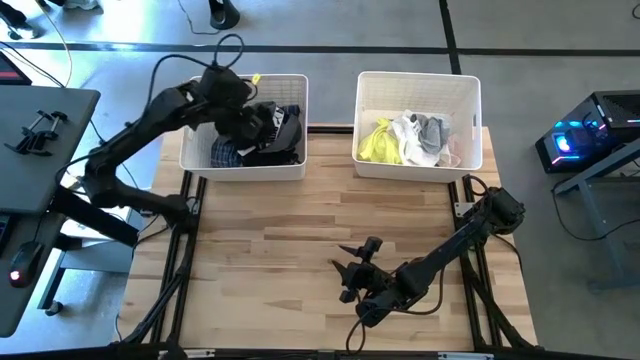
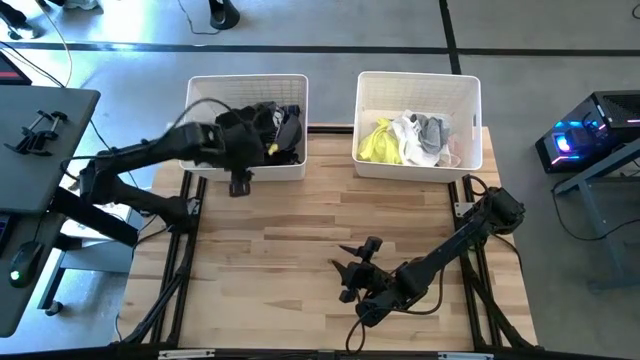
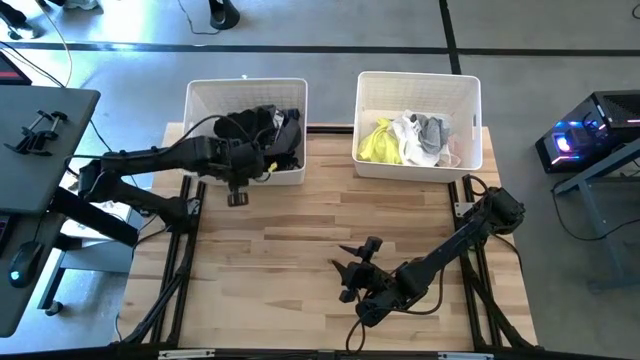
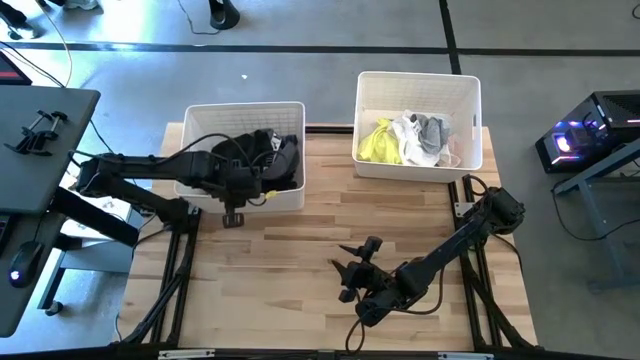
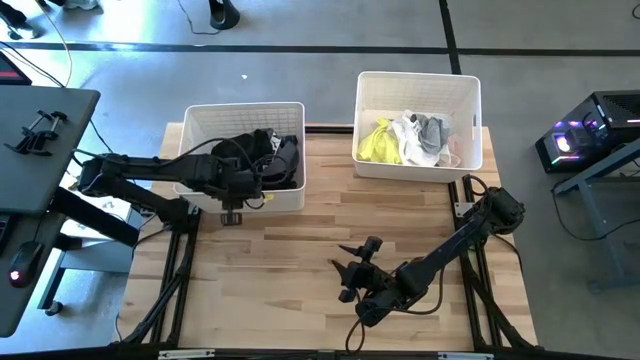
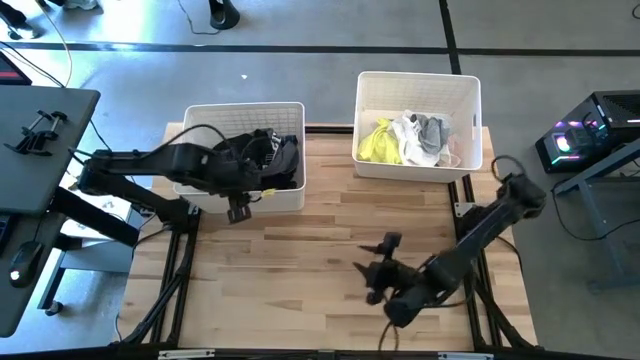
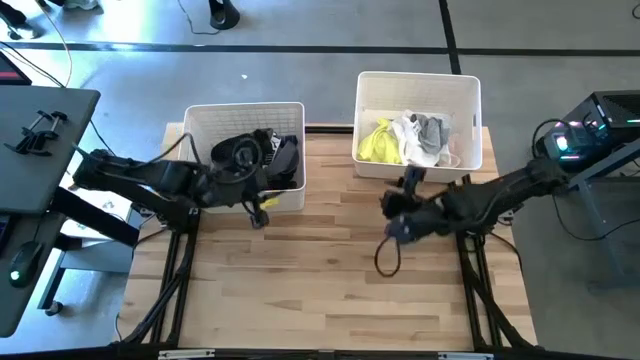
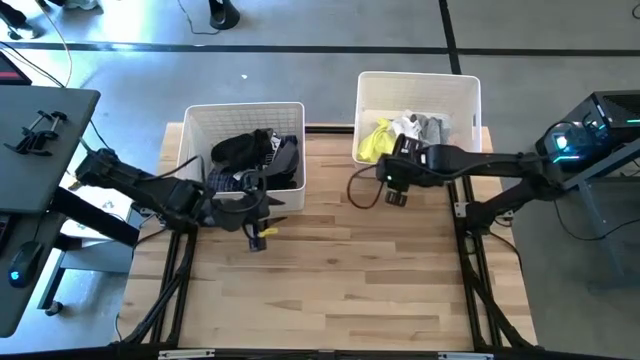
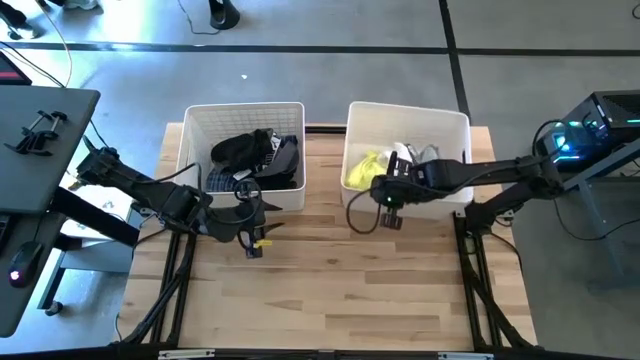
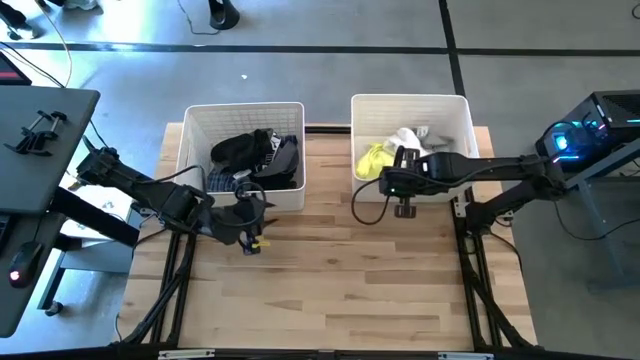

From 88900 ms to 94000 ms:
Task: Sort clothes
Adjust the white bins on the table

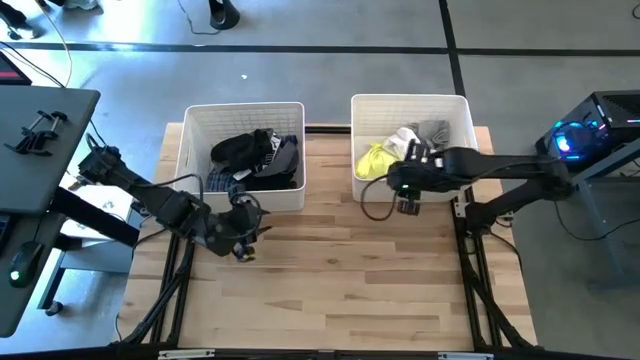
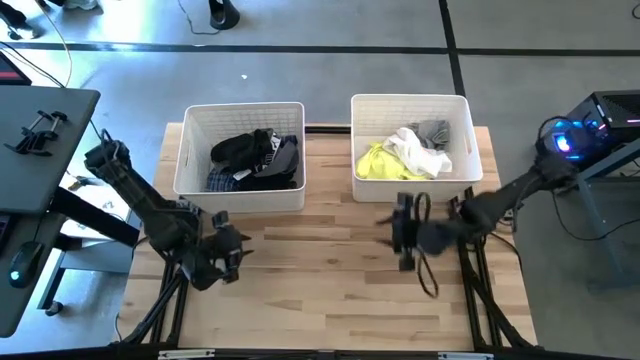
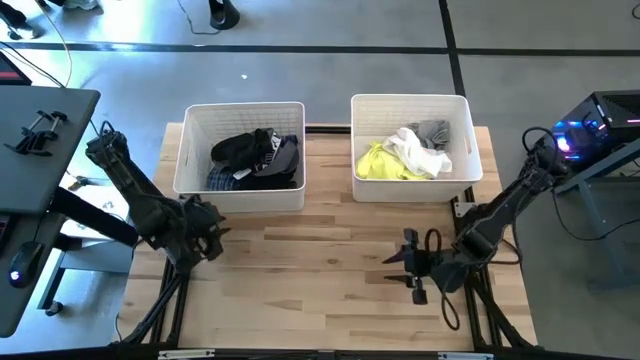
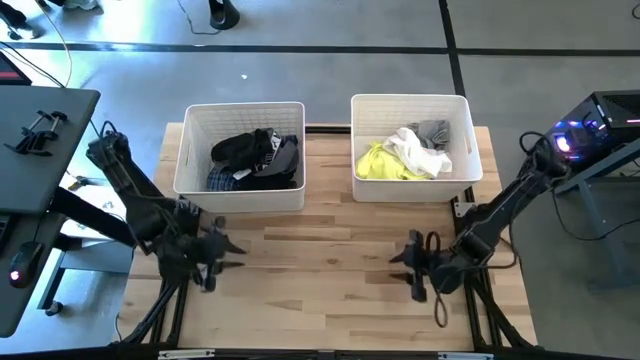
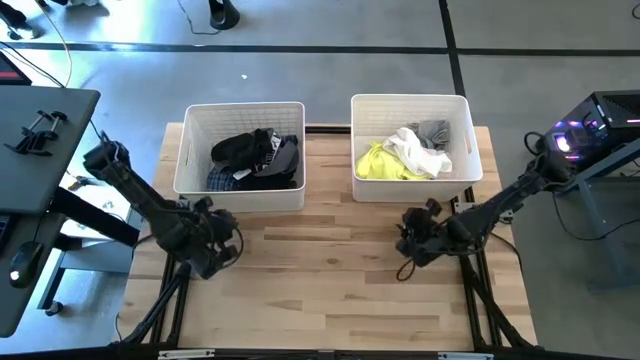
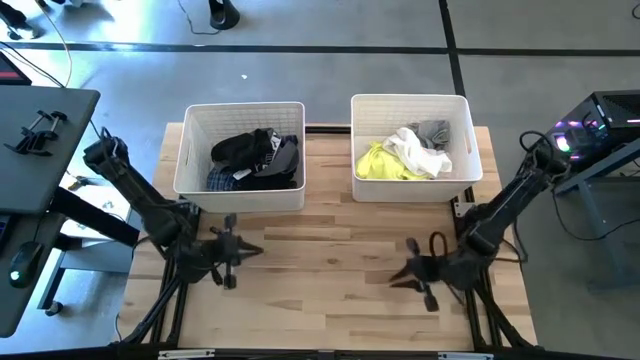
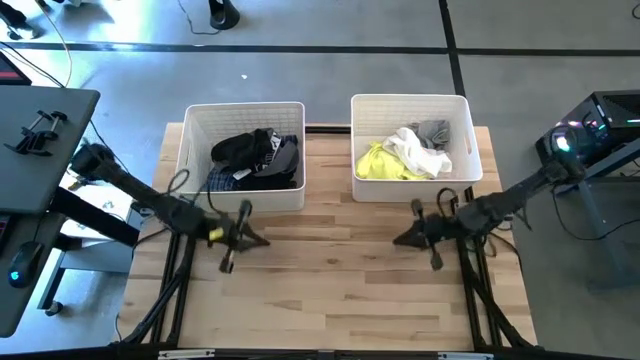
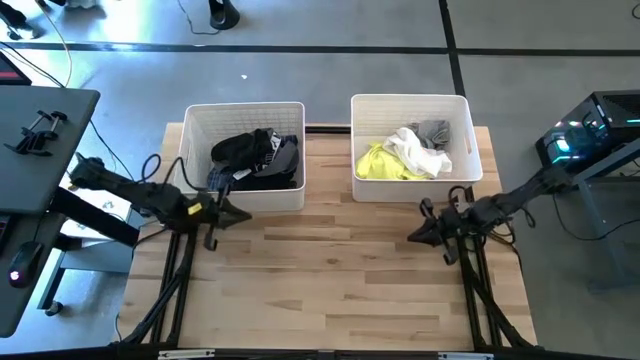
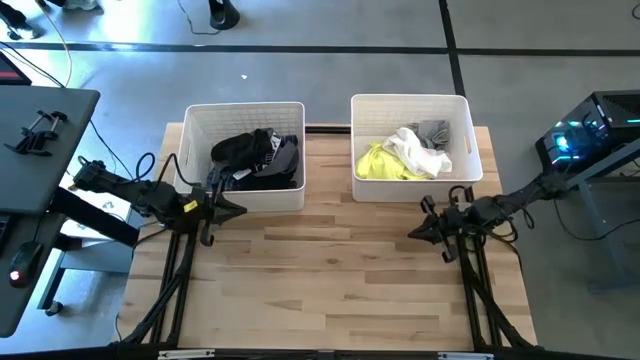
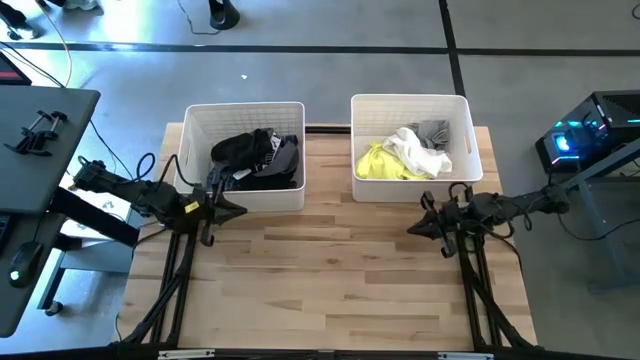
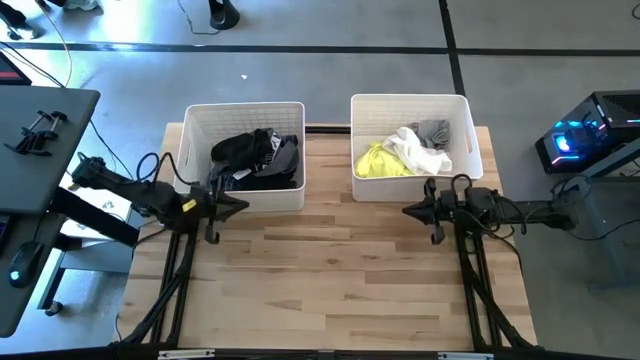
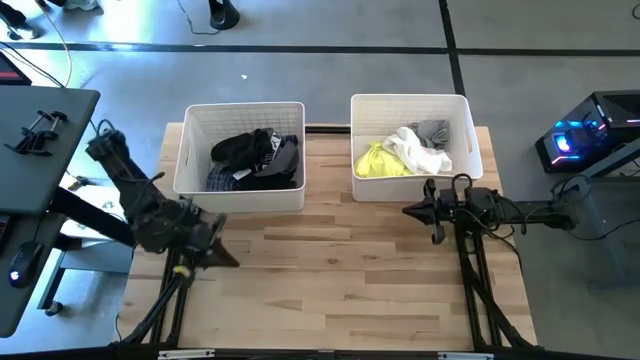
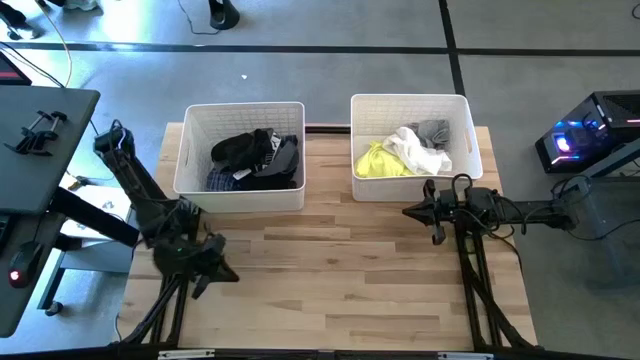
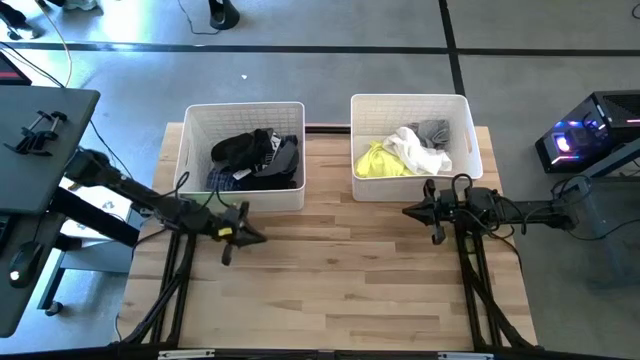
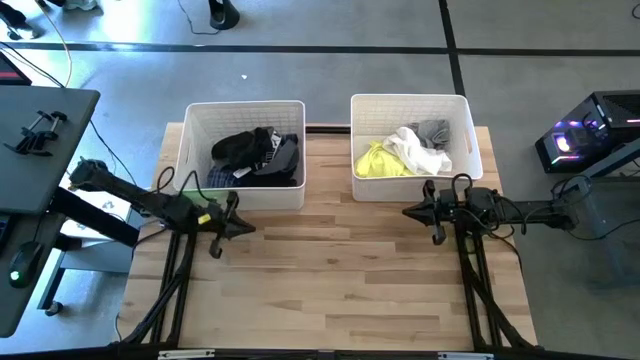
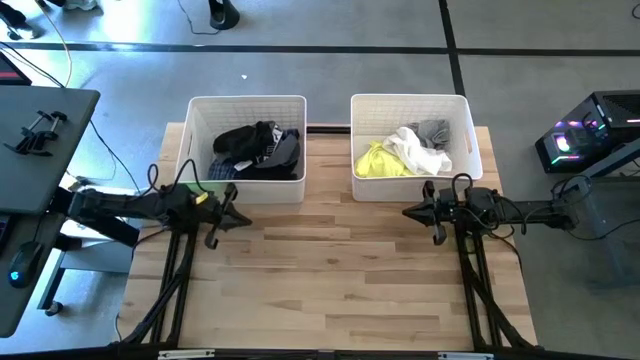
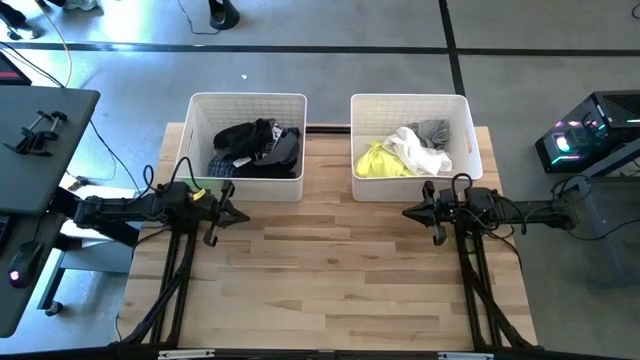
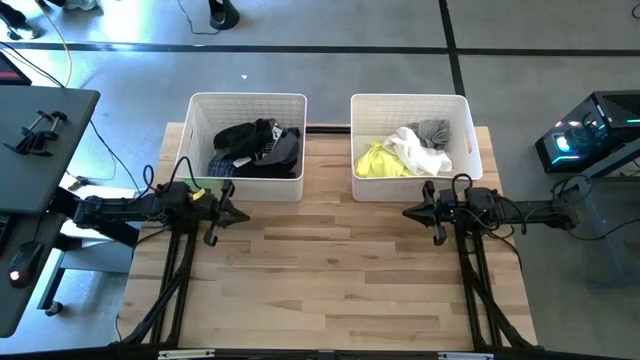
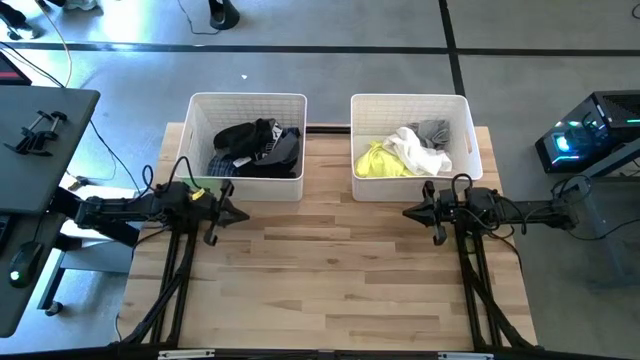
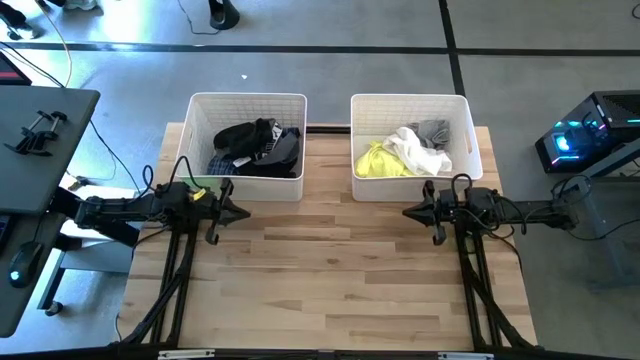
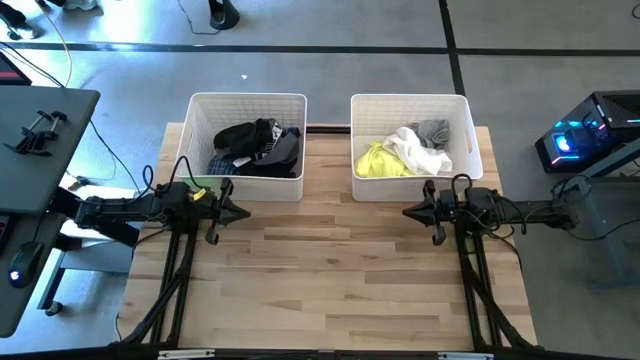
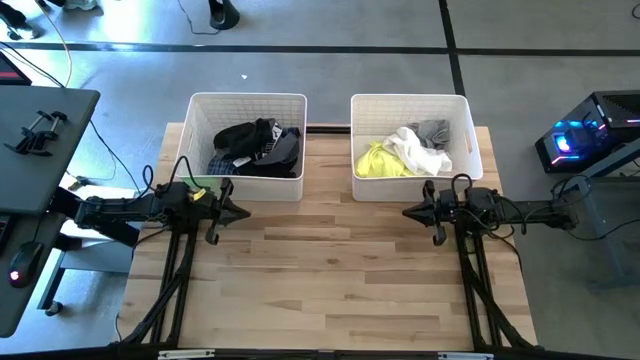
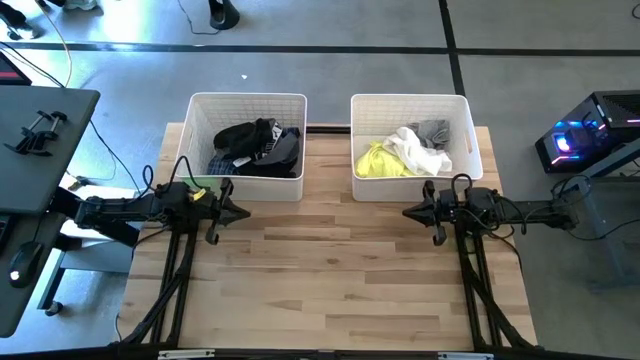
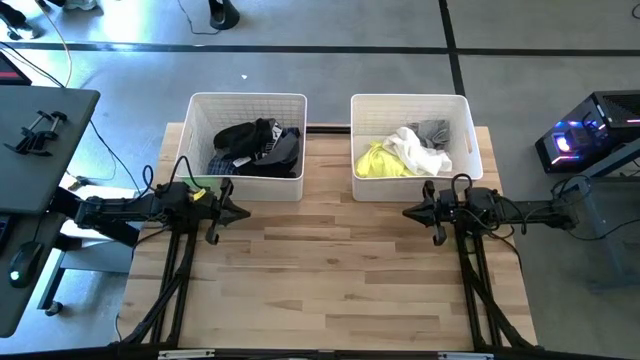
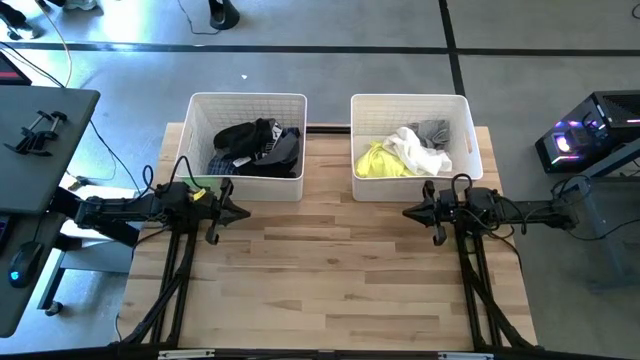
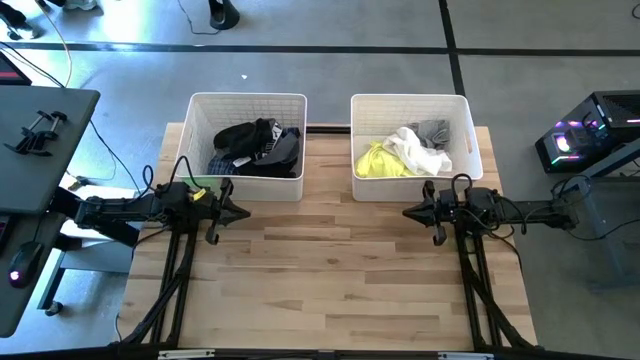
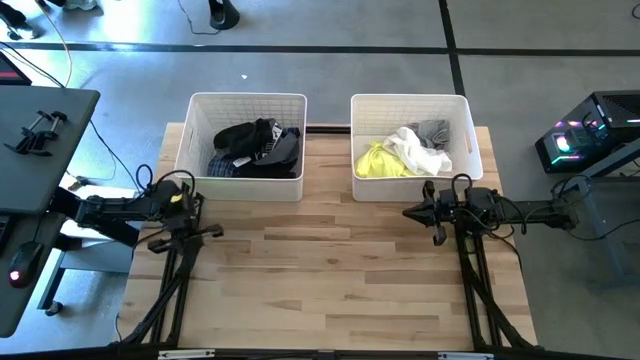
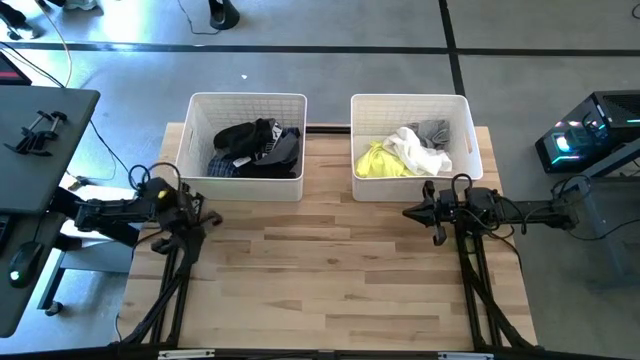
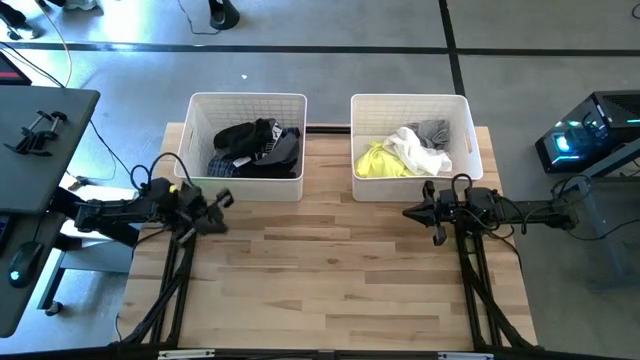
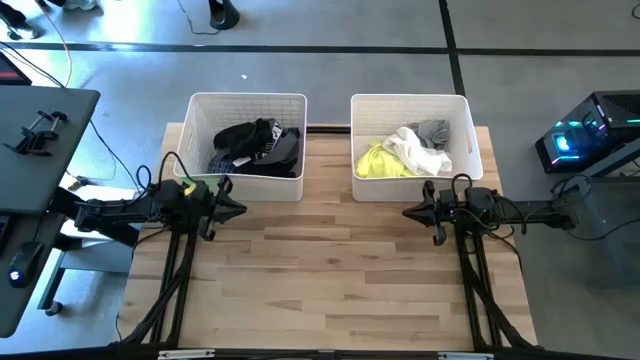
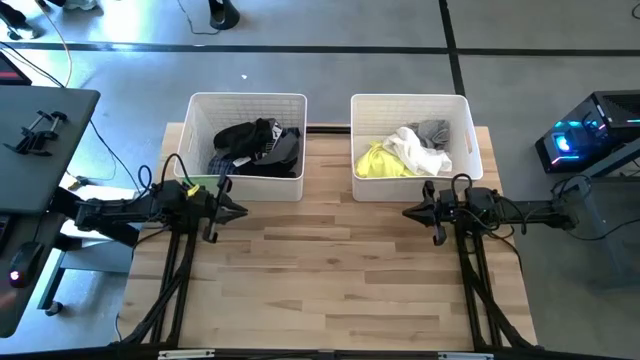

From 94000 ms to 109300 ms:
Return to Home Position

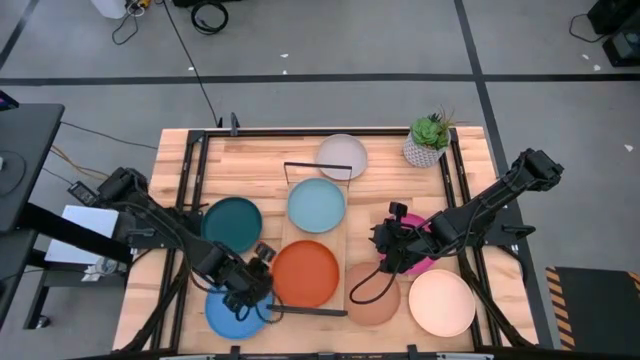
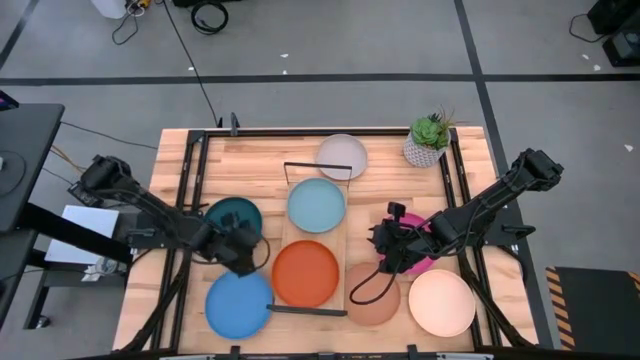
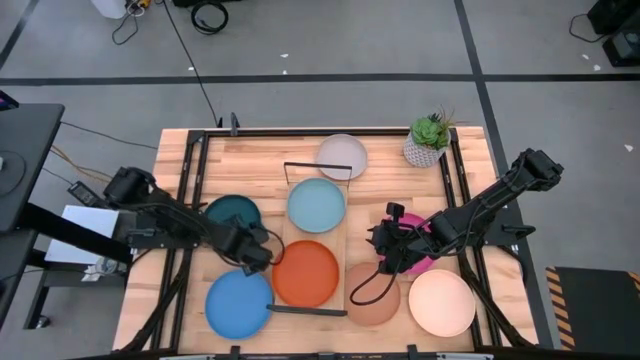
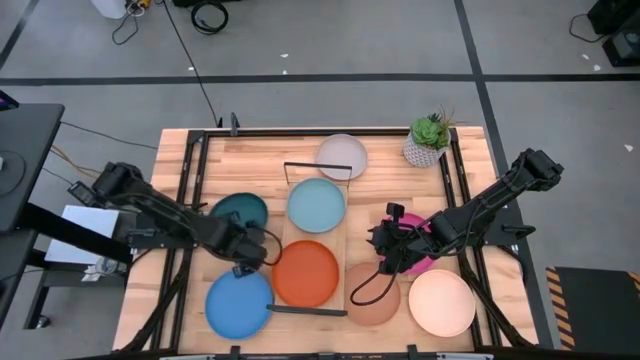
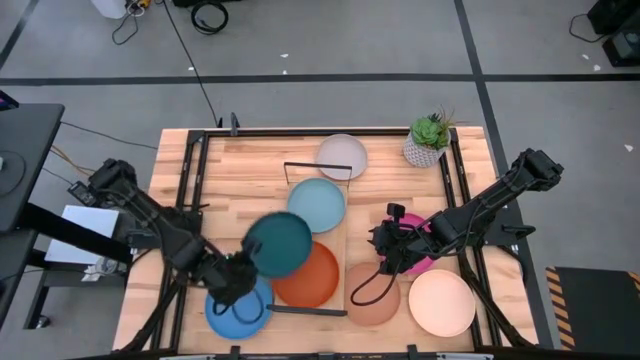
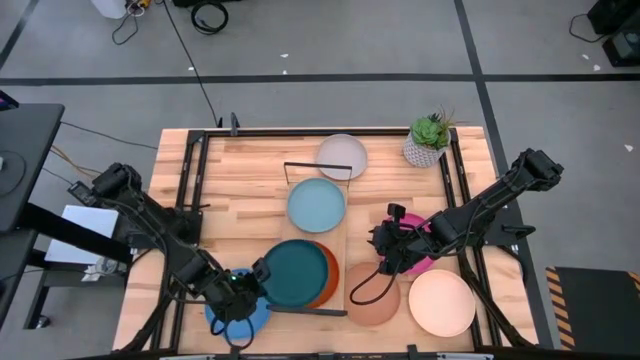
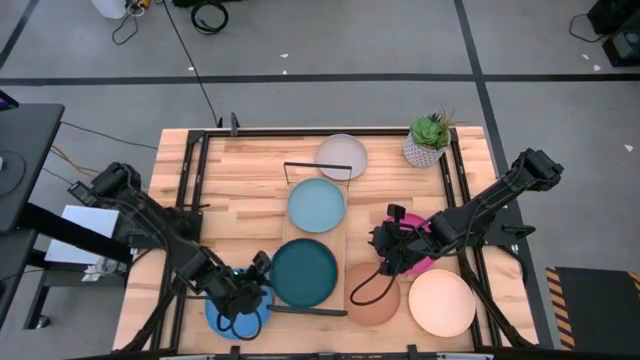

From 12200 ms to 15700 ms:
Task: Place and stack plates onto a shelf
Stack the dark blue plate on top of the orange plate on the shelf
